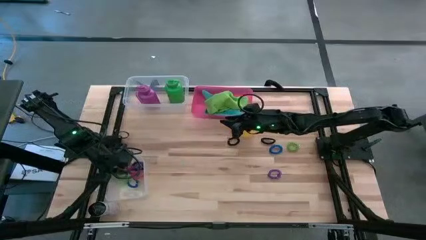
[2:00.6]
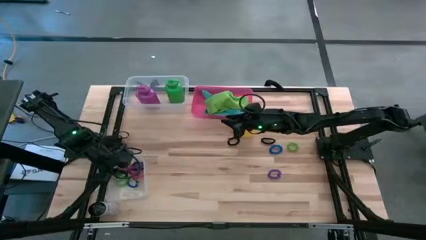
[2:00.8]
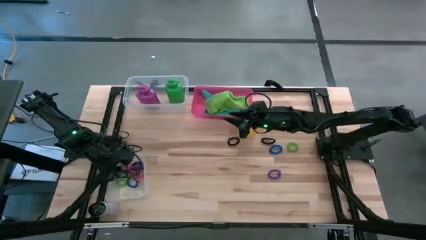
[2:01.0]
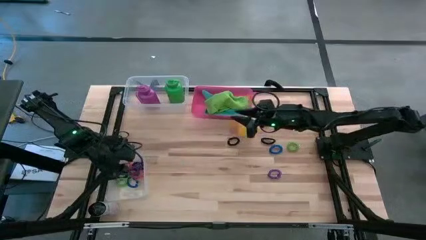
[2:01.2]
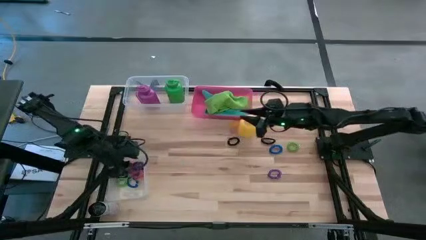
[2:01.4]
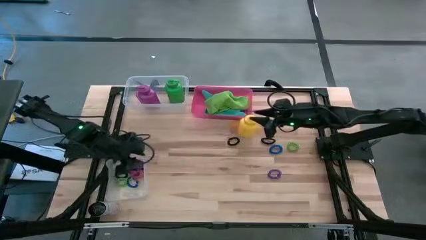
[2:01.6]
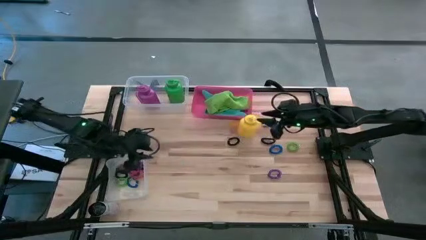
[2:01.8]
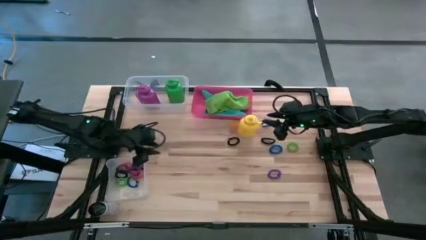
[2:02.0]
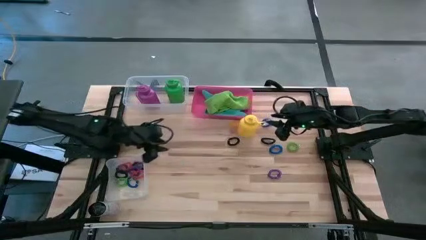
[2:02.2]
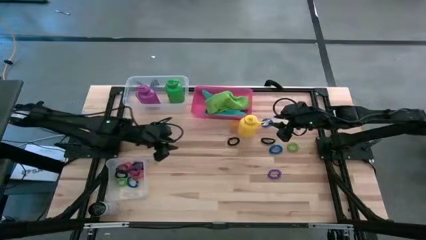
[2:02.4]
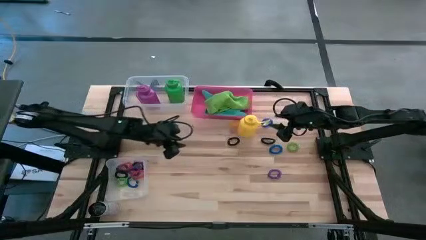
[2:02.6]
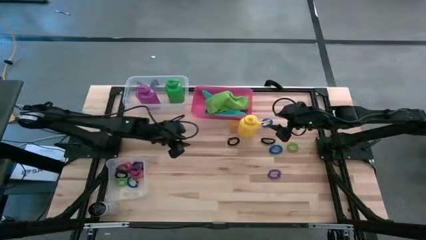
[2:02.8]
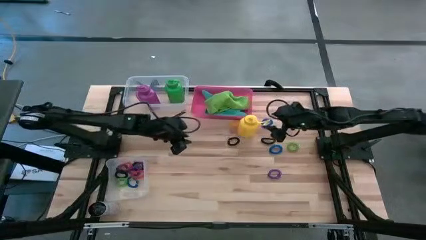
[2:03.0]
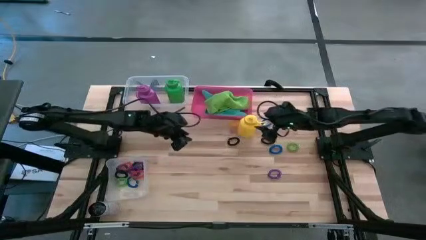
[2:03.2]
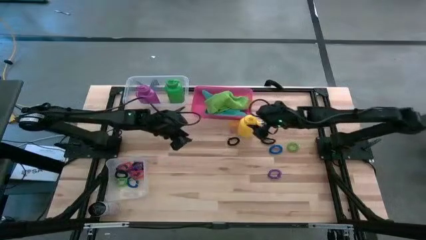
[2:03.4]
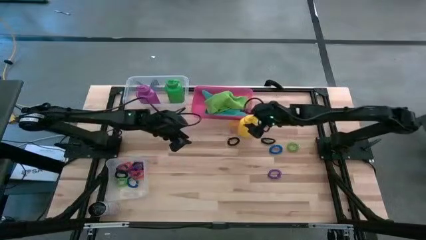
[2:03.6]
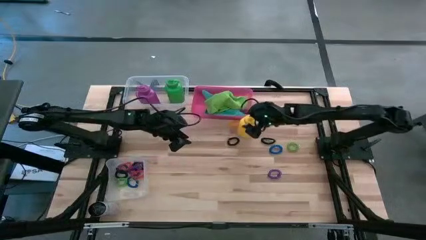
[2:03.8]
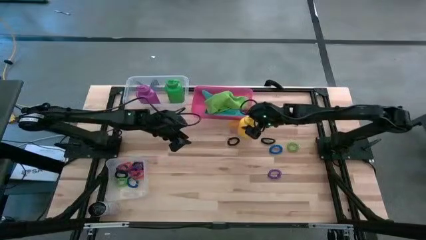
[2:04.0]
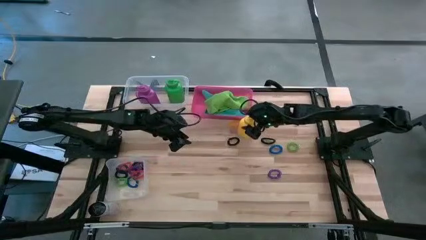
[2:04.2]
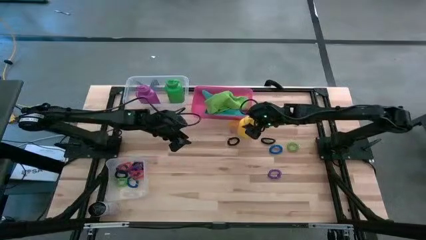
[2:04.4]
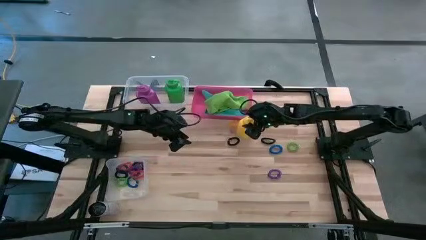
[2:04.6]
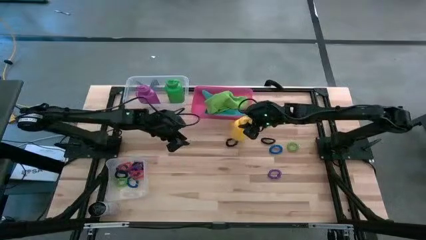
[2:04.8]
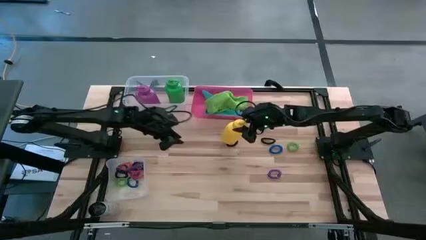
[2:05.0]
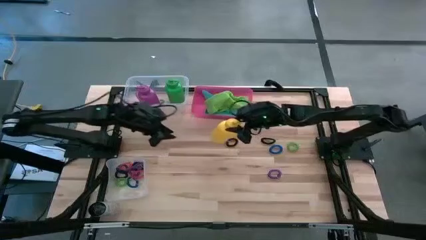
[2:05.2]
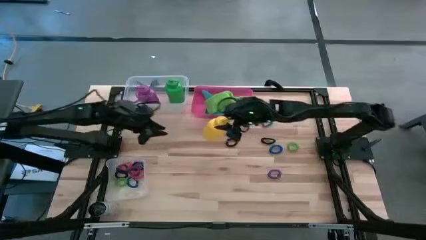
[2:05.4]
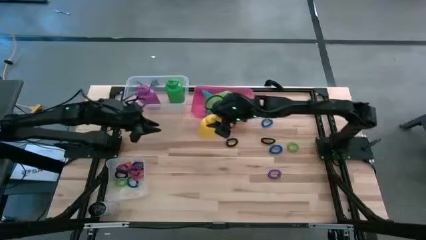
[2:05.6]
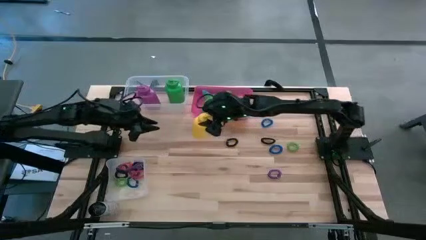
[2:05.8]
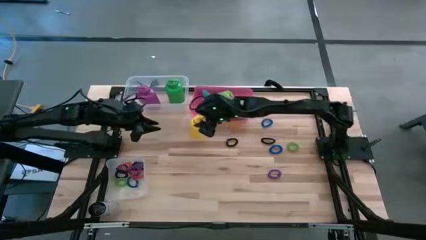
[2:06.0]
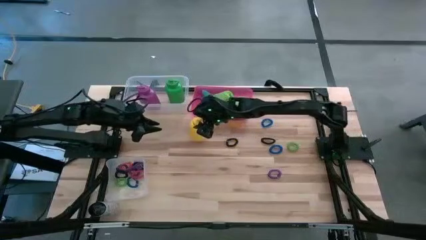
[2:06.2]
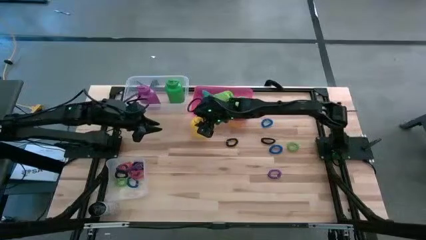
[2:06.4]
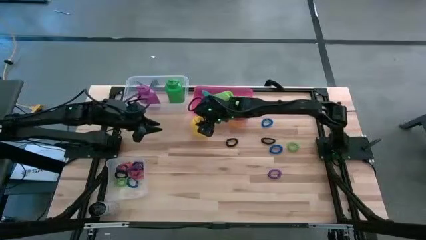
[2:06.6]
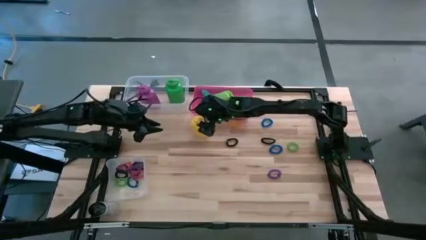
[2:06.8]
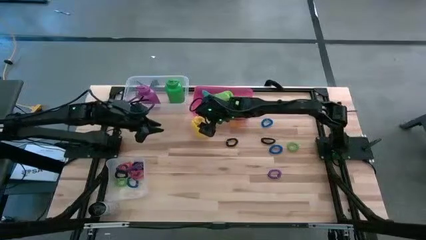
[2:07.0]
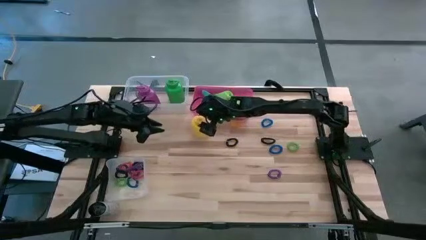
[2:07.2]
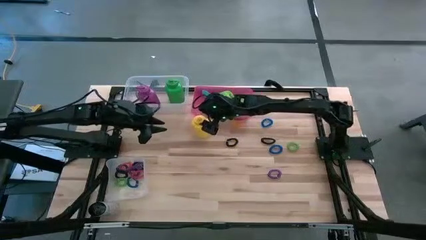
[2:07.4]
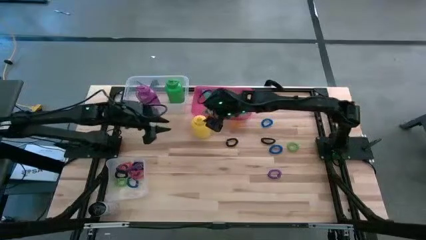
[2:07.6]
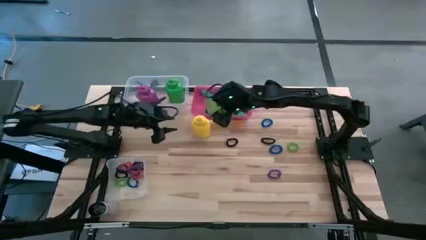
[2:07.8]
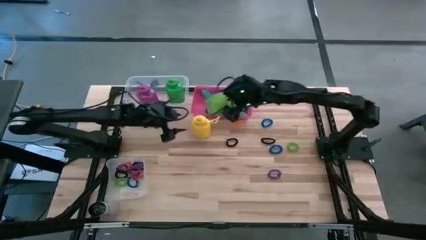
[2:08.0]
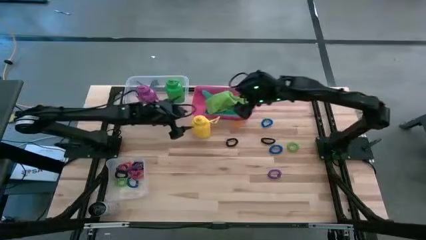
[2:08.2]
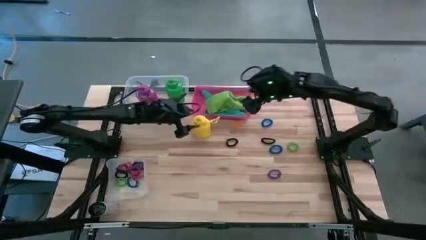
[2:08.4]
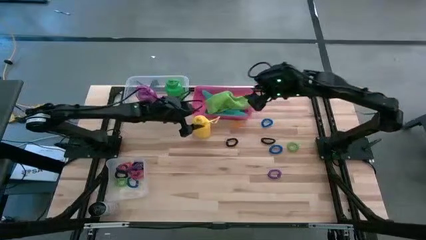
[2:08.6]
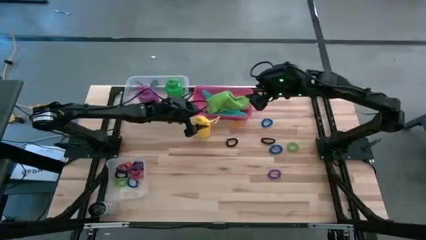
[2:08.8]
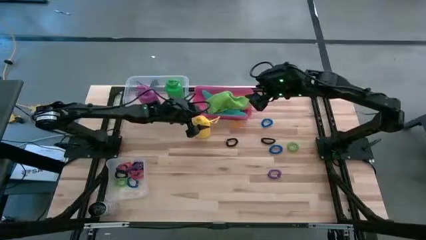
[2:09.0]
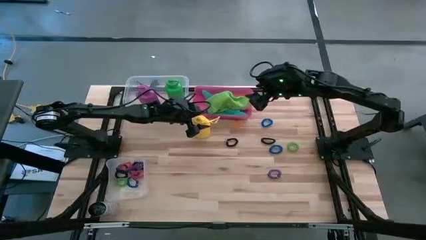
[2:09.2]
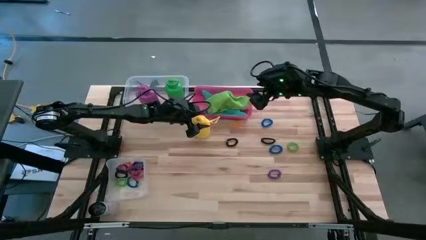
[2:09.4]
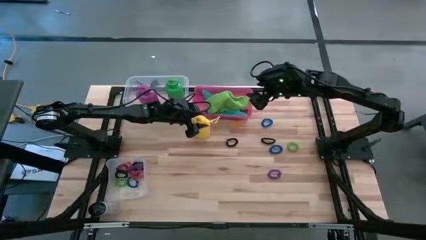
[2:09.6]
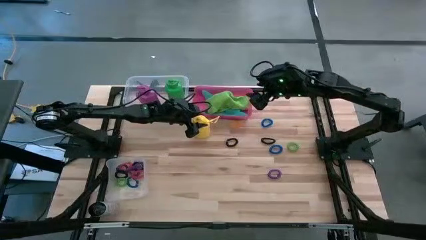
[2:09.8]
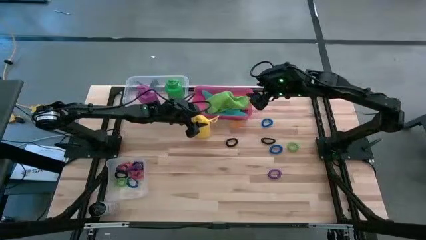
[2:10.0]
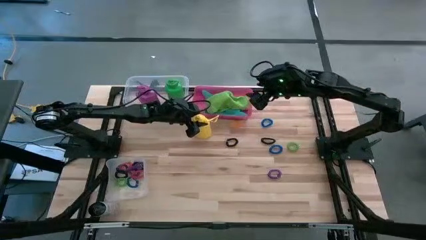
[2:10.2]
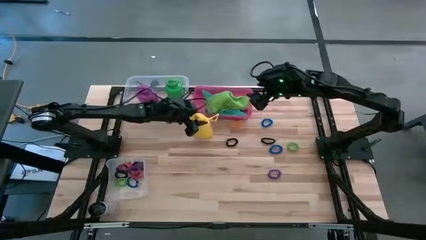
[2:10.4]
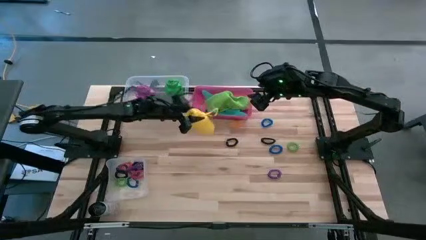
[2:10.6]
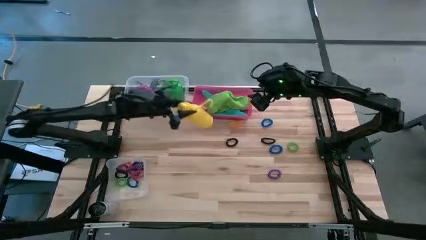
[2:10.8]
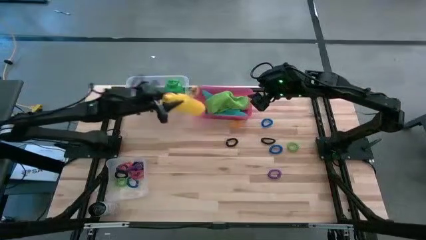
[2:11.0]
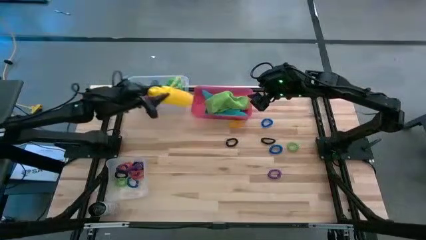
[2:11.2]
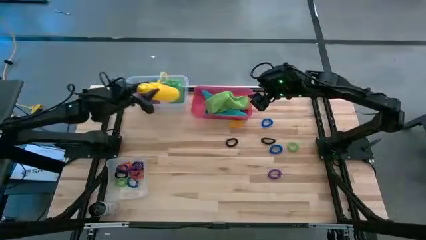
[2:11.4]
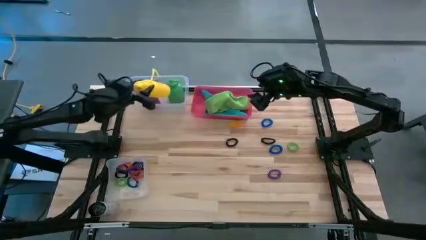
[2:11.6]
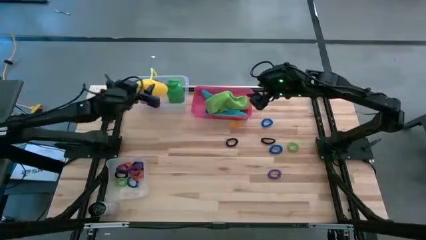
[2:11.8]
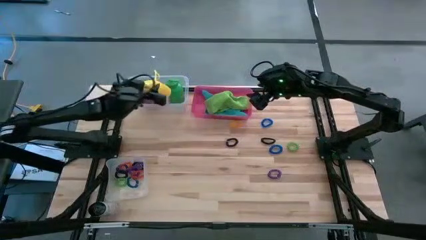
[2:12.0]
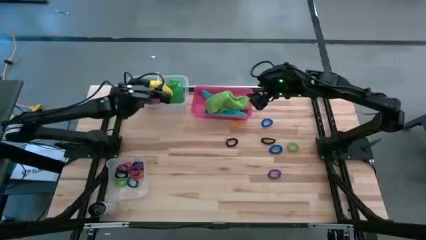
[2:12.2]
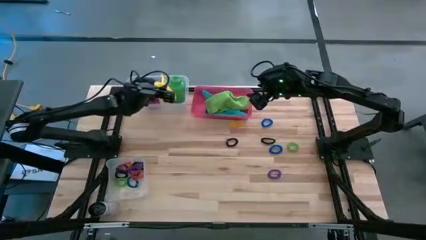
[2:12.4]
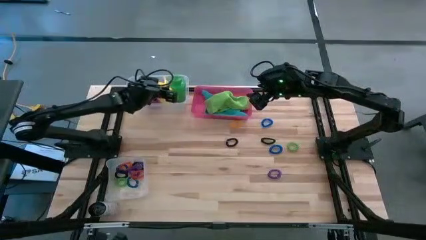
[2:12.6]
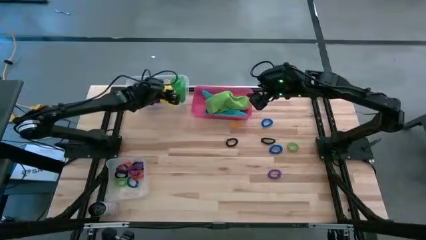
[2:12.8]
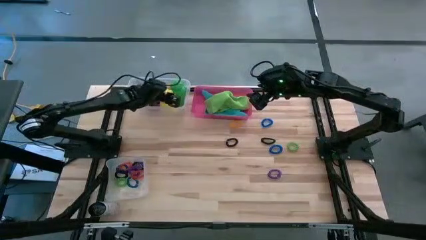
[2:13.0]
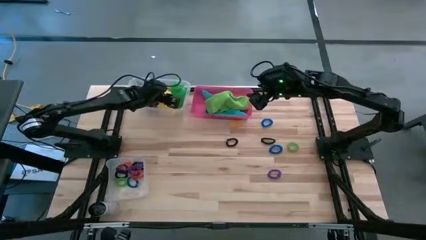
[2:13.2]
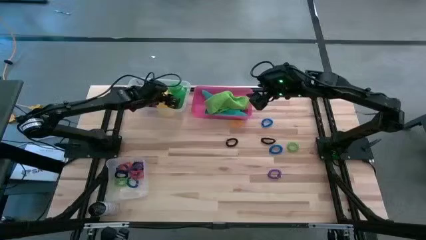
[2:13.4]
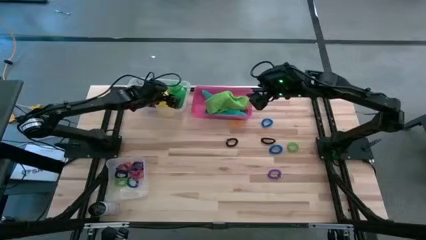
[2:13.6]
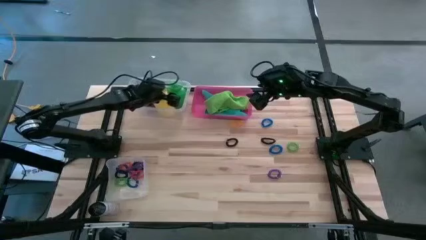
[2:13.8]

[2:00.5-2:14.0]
Task: Pick & Place Sports Items
Put the yellow tumbler into the top transparent bin

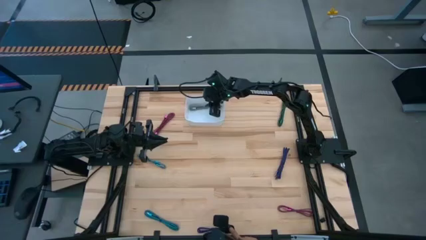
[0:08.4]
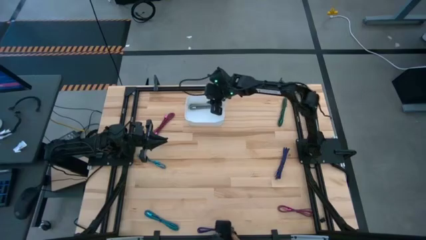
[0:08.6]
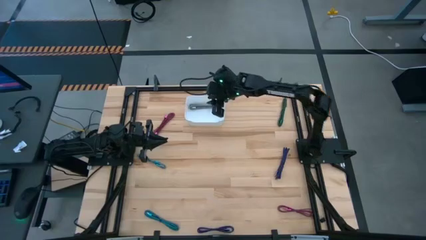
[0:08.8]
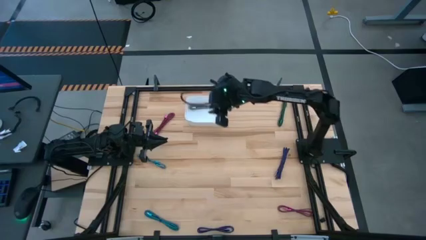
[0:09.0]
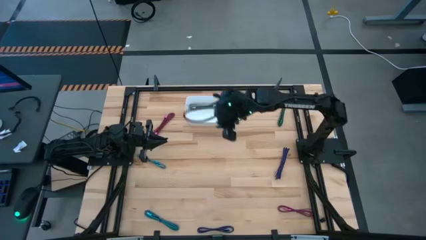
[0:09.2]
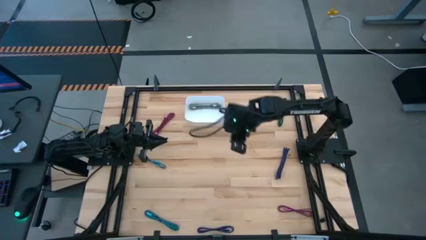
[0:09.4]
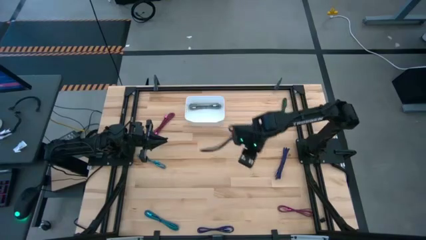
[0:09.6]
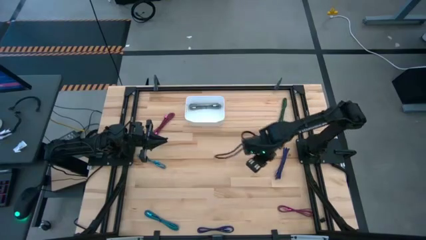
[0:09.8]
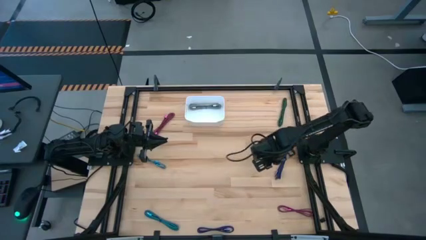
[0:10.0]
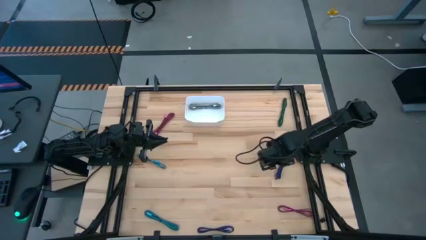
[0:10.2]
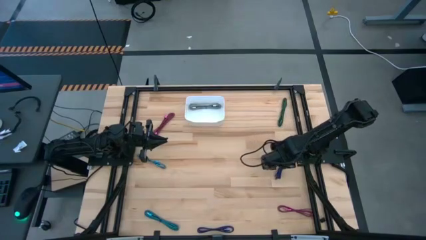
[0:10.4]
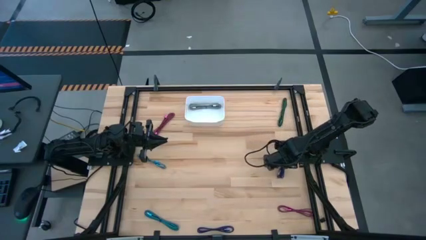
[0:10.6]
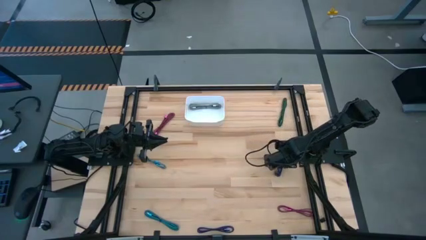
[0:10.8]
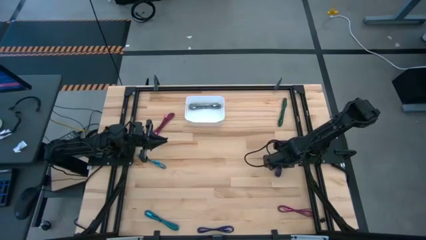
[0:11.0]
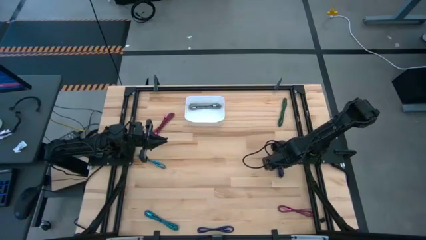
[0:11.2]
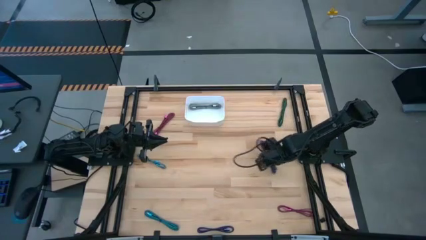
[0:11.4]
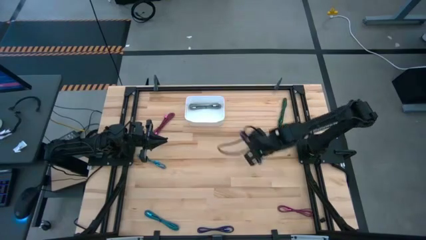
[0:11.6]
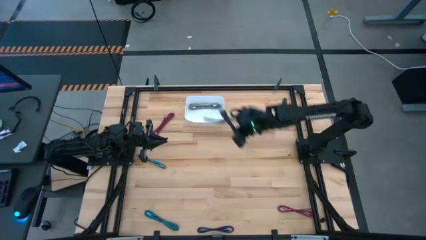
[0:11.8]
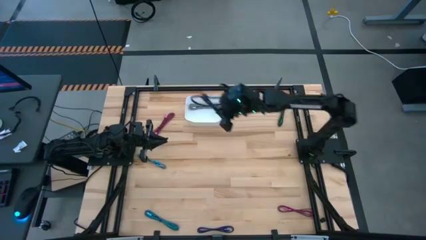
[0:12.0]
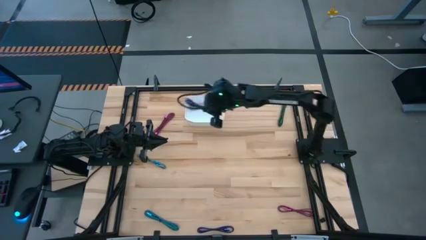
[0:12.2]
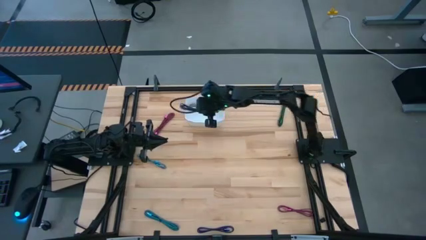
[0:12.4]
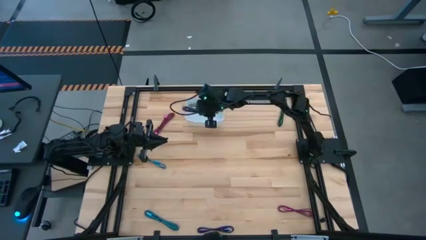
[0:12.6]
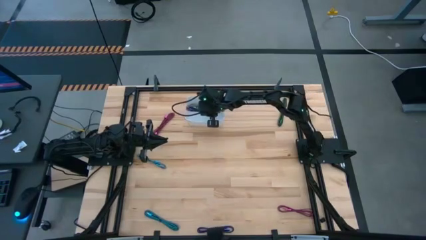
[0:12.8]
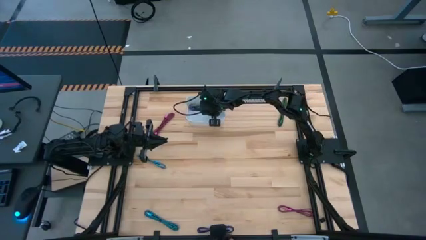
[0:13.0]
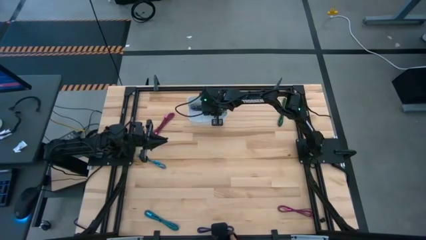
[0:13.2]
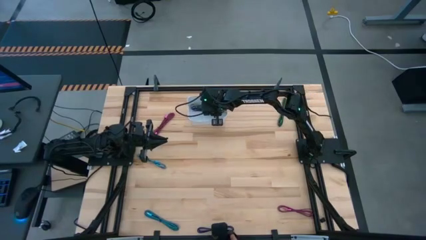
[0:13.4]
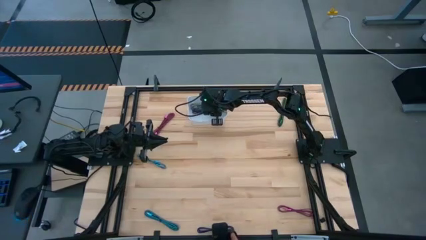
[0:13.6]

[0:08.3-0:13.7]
Task: Pick and place USB-C Cables
Put the top black violet charger cable into the white bin
